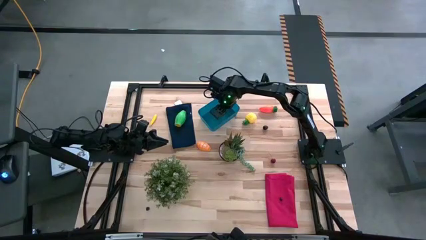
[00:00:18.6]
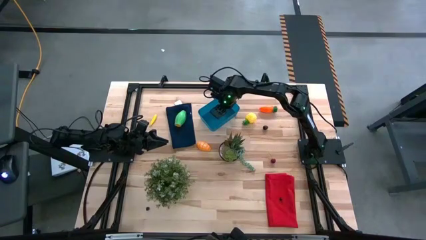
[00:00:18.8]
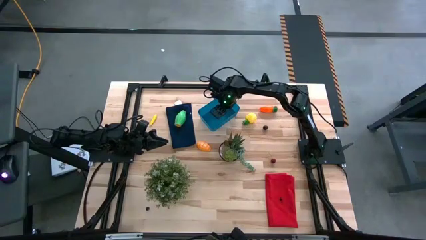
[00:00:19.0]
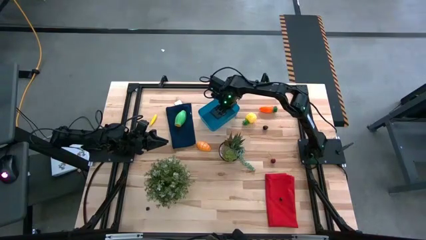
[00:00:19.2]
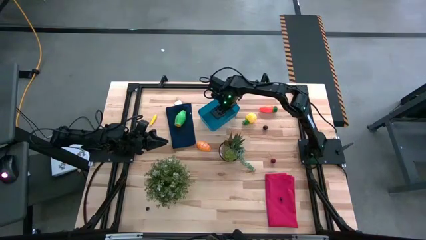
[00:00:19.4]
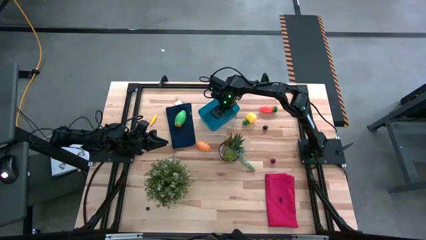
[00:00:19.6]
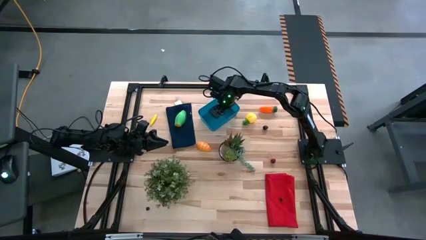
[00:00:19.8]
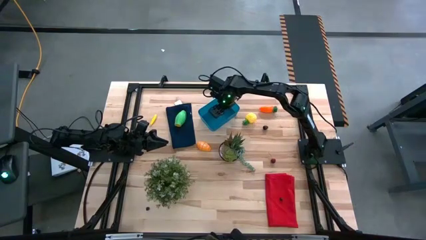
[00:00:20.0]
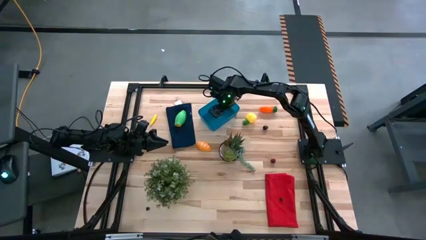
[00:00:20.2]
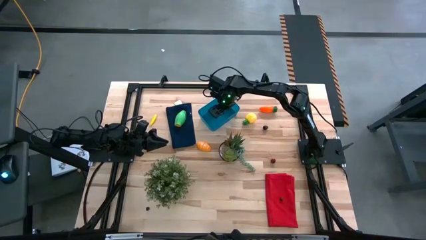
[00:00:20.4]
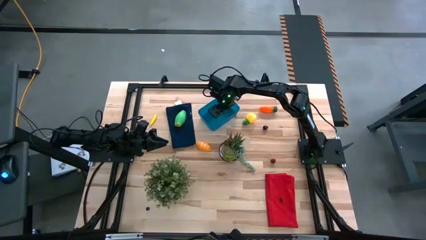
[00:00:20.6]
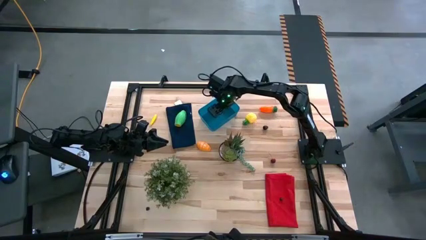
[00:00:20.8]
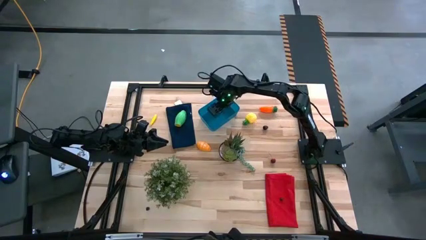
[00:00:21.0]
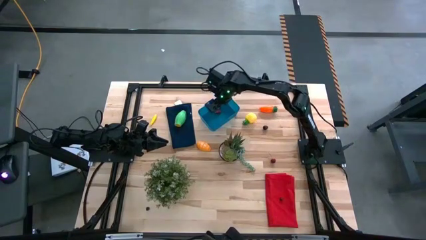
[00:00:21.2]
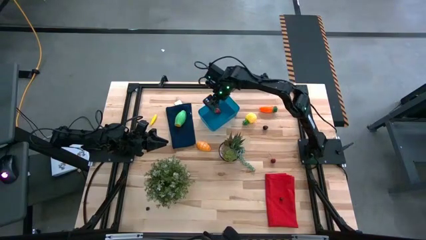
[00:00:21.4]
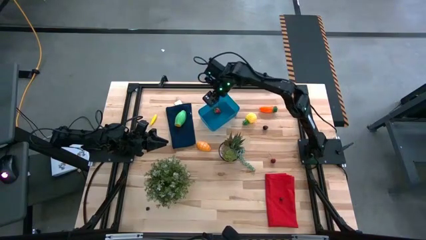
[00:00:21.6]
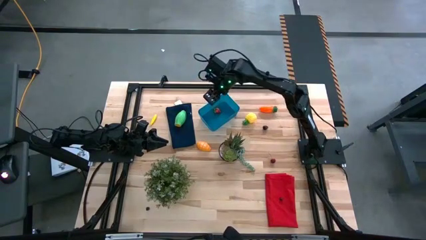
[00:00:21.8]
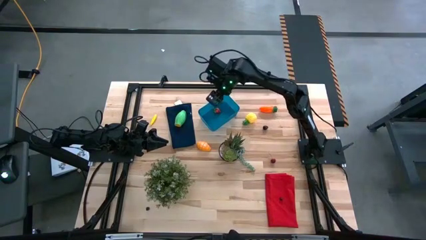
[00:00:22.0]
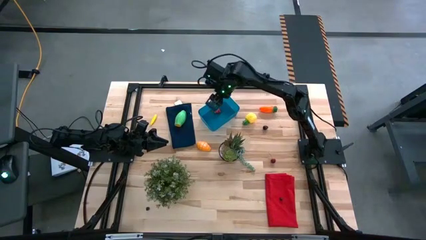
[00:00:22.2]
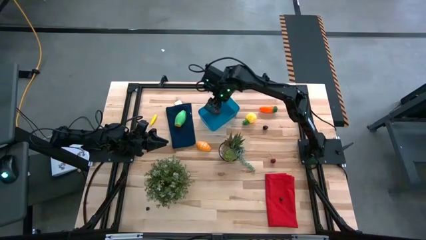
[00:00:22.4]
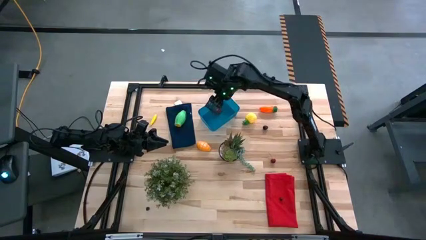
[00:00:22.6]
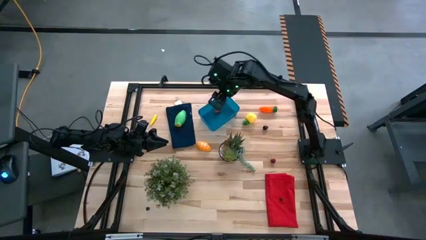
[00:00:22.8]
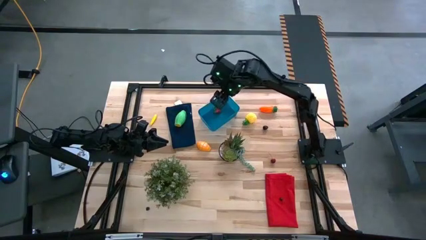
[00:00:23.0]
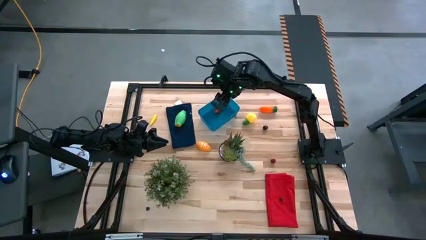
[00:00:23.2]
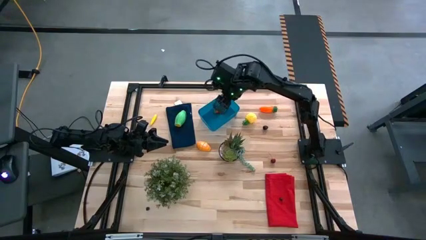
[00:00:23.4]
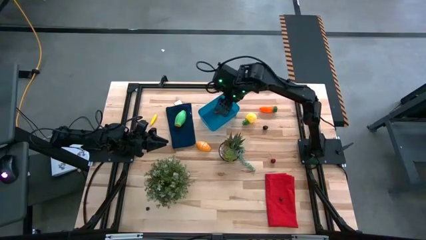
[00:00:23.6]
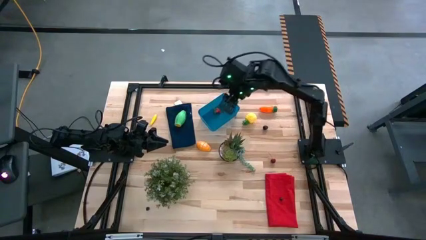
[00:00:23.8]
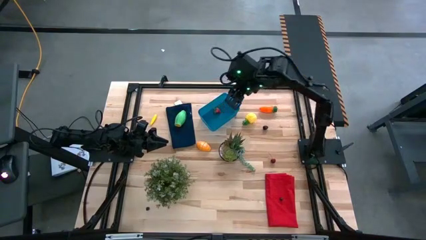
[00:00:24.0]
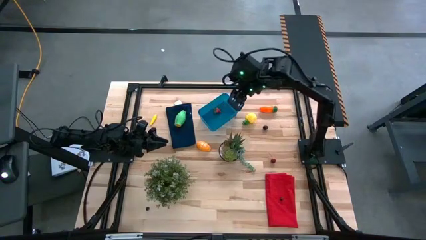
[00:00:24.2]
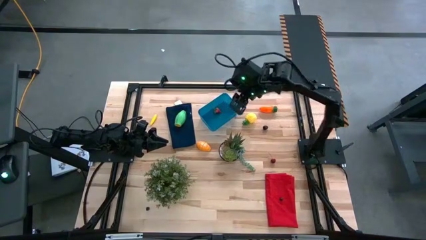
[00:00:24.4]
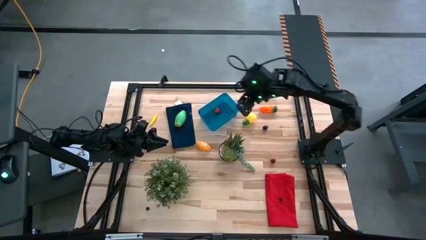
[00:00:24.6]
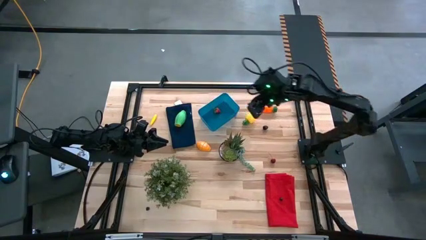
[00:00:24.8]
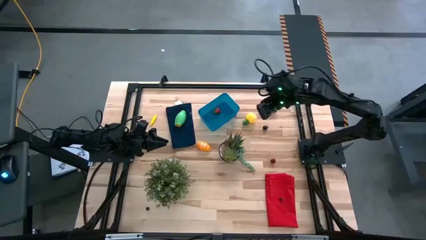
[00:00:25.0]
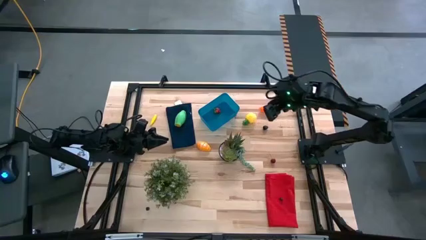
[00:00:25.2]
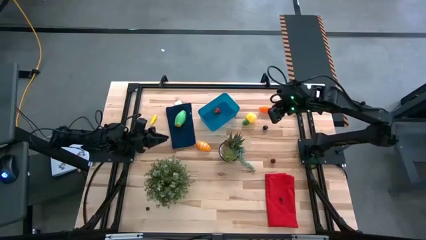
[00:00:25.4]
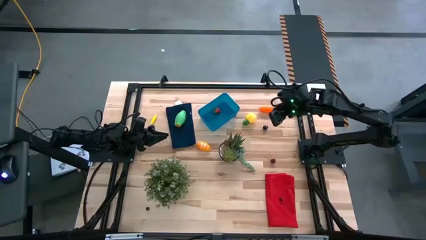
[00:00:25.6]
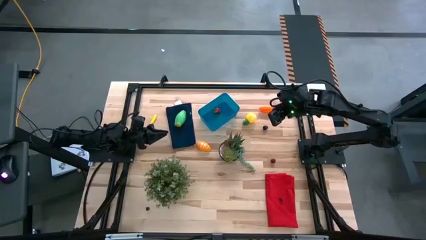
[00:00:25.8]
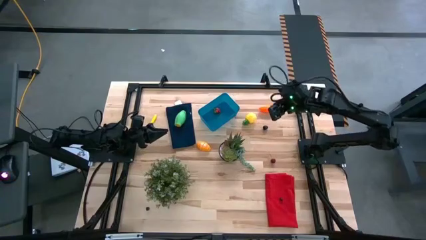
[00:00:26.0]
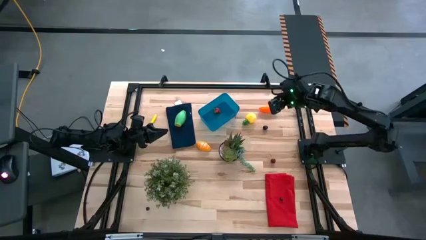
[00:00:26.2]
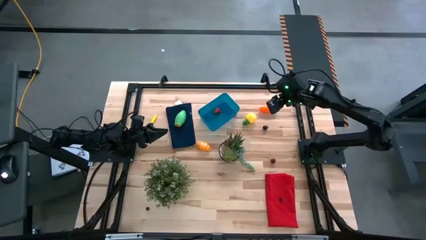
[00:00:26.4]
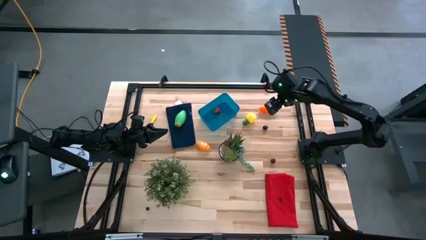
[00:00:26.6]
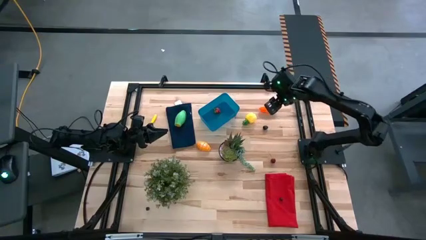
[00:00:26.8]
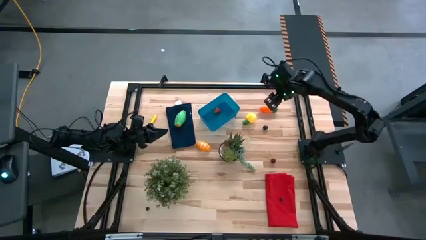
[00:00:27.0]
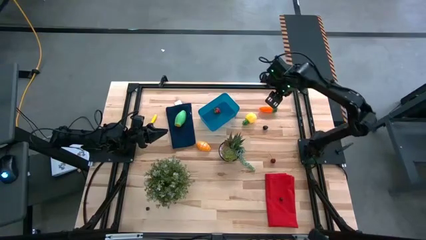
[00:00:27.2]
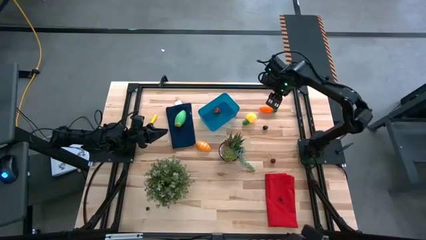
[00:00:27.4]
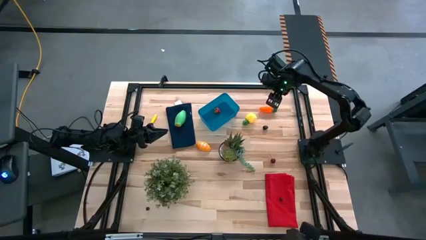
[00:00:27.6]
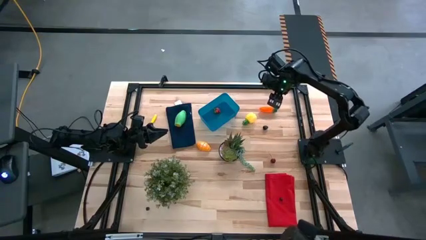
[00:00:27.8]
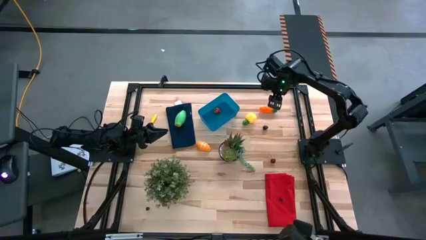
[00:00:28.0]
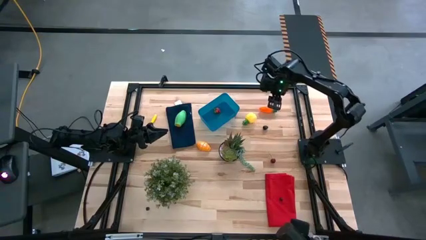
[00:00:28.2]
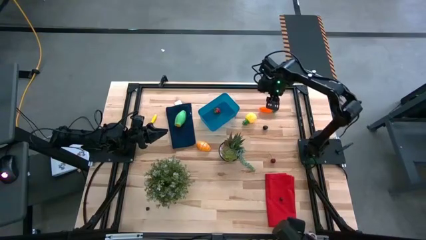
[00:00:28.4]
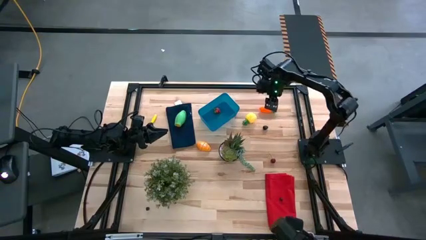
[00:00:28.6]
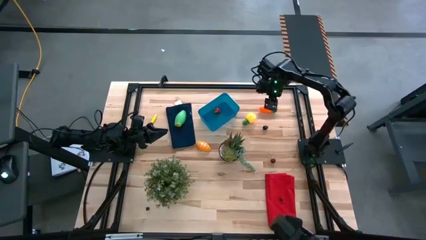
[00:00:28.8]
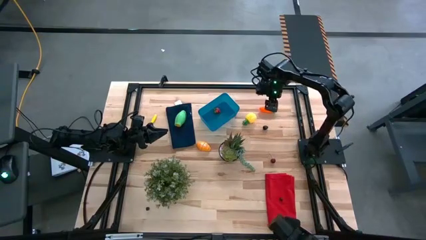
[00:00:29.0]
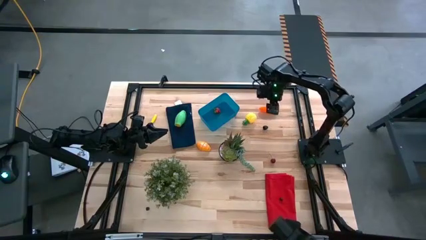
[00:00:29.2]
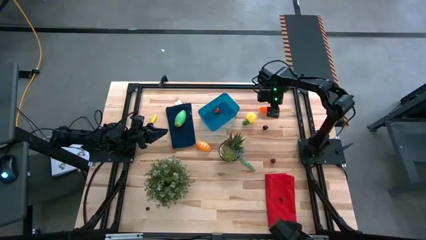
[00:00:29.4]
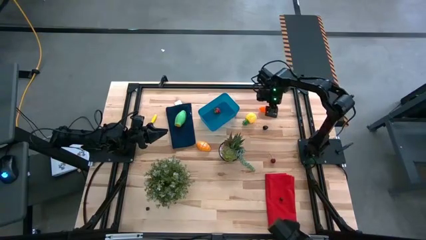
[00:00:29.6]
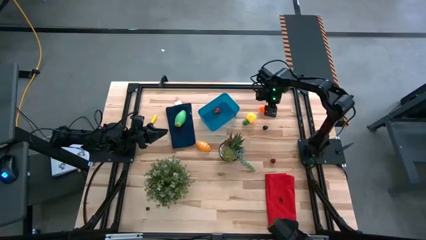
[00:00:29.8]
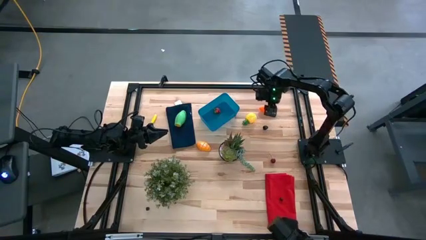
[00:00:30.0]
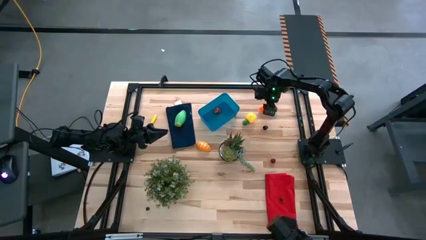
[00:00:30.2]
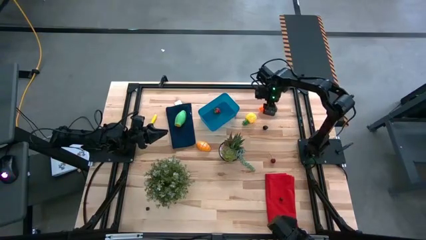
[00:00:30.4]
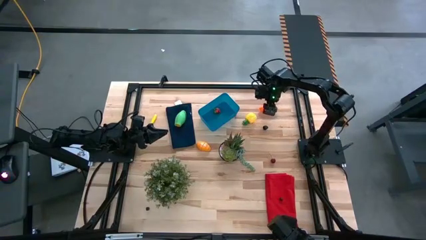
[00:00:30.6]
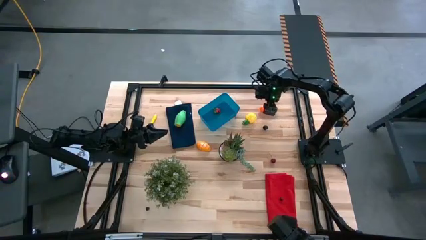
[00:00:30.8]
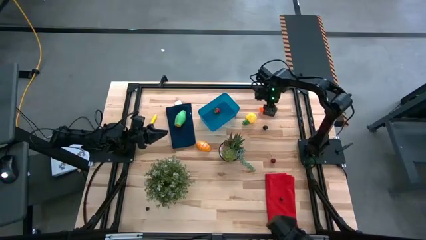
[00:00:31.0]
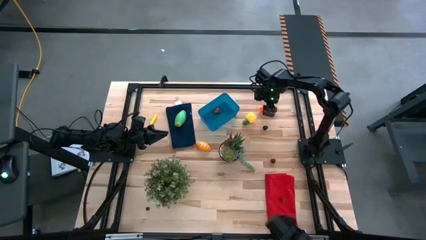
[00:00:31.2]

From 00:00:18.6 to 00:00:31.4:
Task: Pick and placing Produce into tupperware
Put the orange carrot into the blue bin

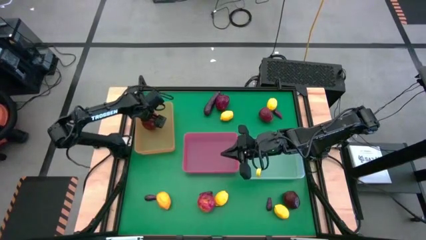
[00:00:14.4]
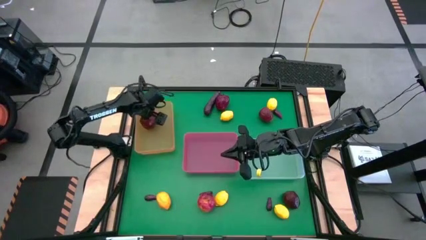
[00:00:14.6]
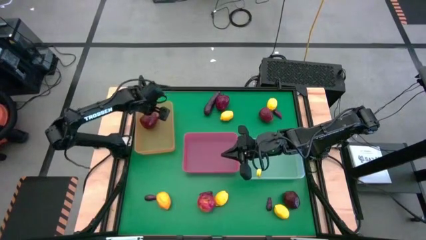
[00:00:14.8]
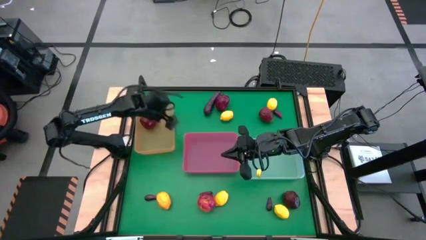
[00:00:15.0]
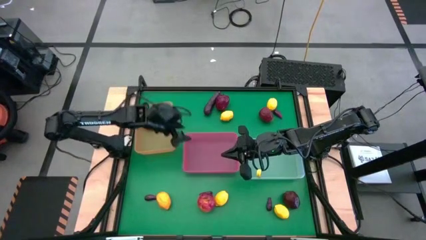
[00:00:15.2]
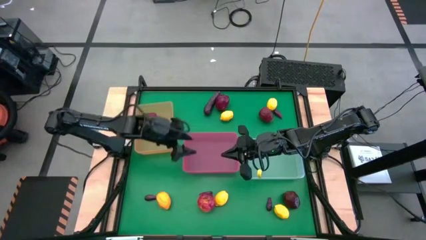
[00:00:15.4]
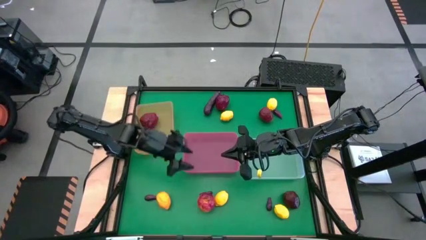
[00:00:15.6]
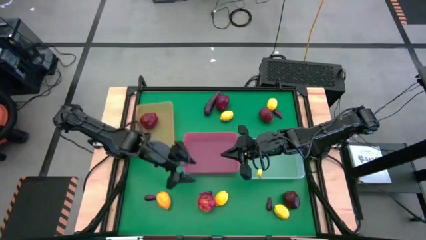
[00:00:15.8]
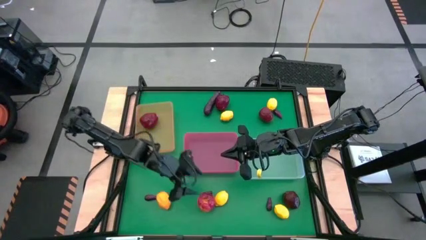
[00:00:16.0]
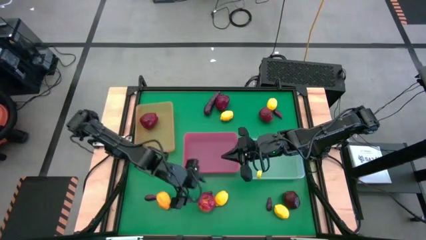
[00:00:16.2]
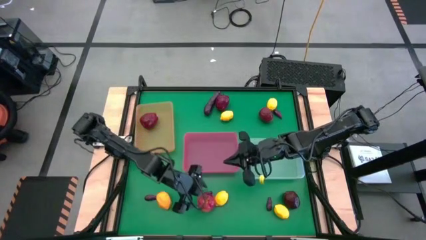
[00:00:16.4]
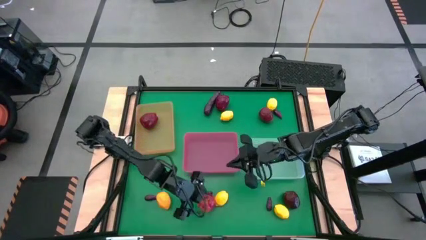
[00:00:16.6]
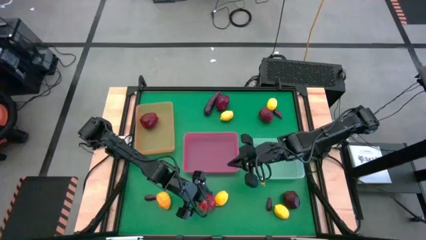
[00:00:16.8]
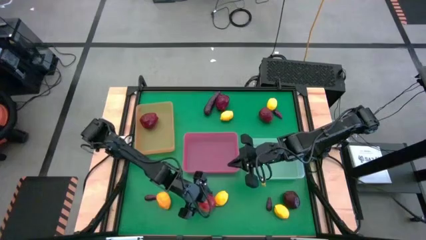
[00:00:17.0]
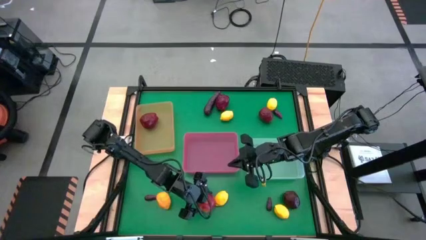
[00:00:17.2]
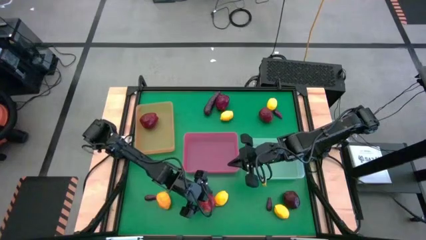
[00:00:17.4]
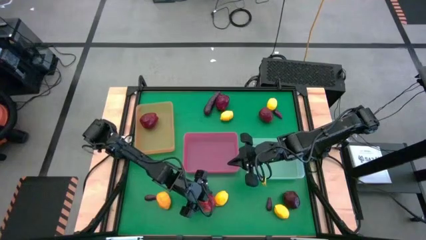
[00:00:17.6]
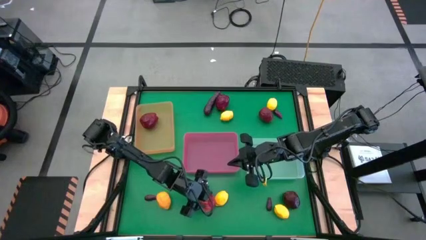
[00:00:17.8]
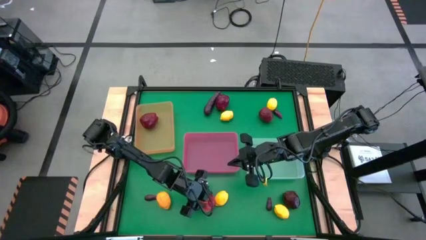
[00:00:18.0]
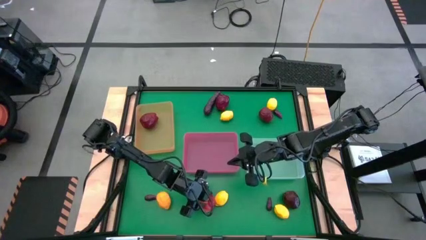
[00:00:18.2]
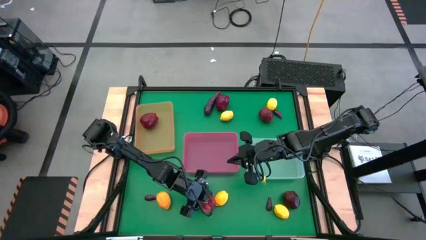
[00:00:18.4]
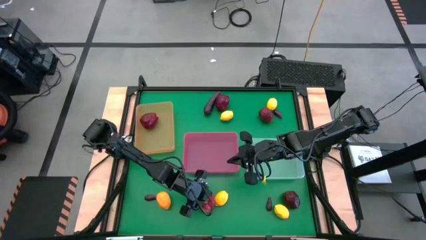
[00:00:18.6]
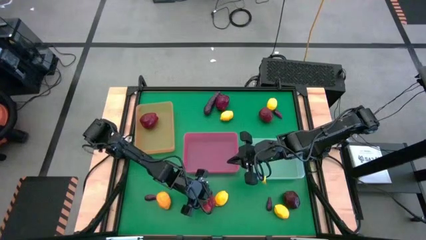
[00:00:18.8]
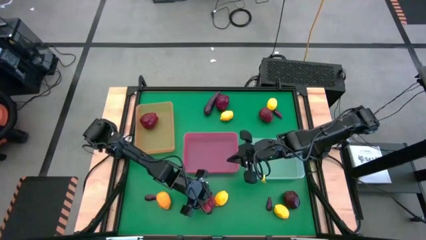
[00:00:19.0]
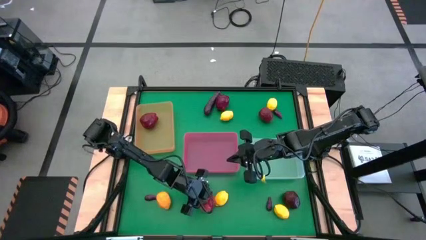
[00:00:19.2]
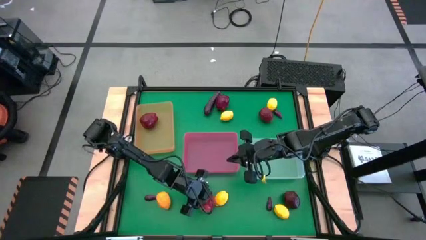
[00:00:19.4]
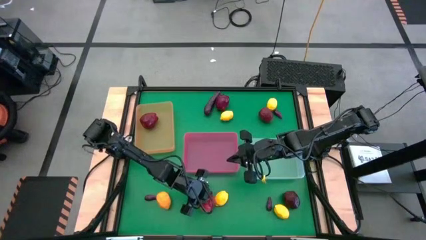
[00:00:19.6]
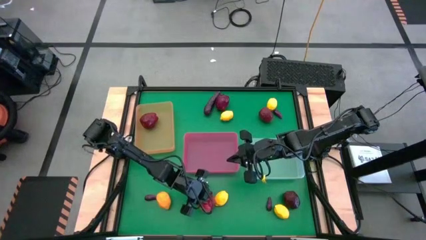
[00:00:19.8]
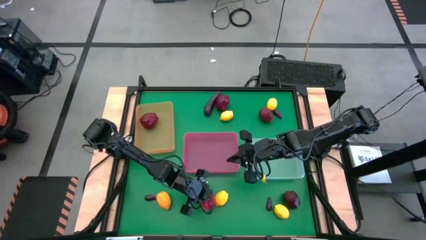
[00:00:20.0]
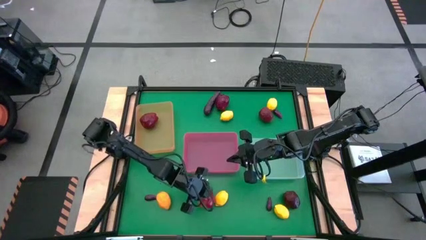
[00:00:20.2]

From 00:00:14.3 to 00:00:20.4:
Task: Sort produce into baskets
Put the red apple into the orange bin
